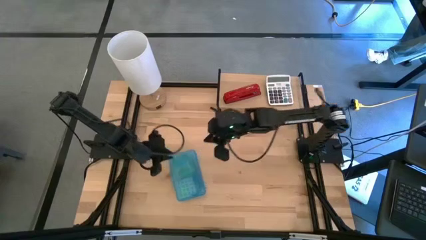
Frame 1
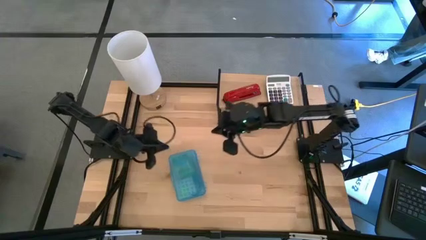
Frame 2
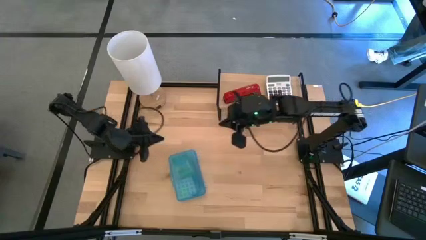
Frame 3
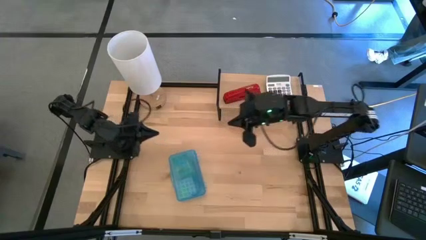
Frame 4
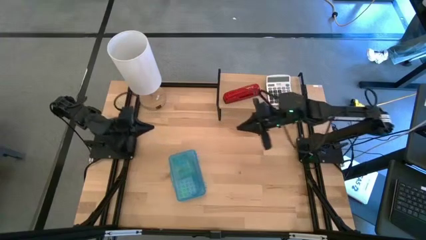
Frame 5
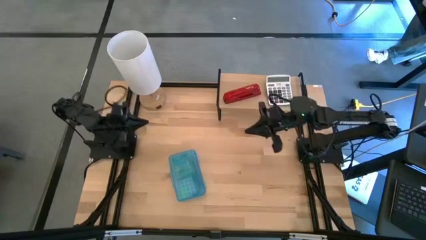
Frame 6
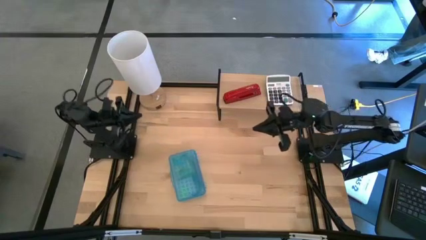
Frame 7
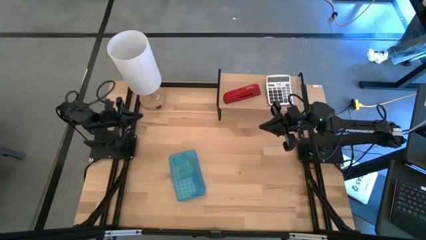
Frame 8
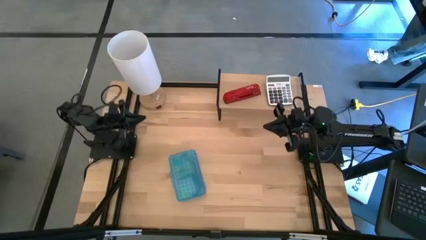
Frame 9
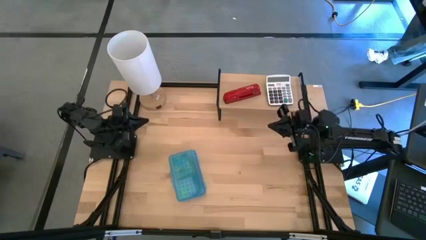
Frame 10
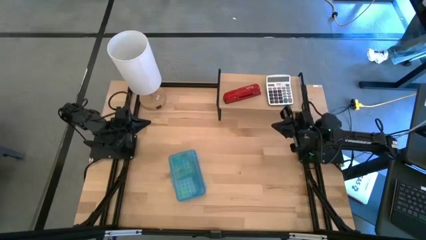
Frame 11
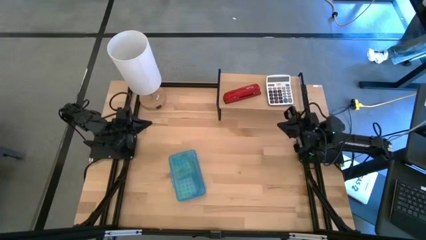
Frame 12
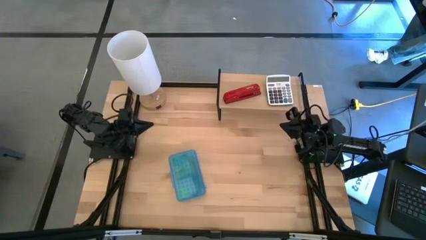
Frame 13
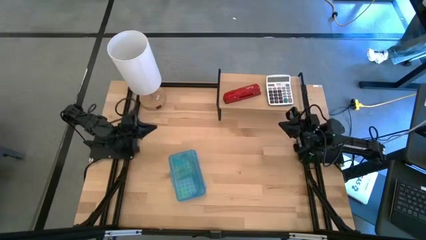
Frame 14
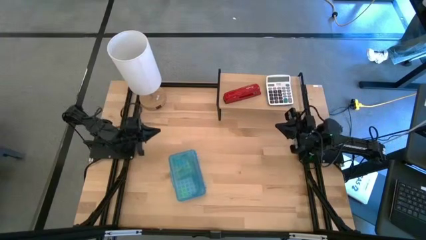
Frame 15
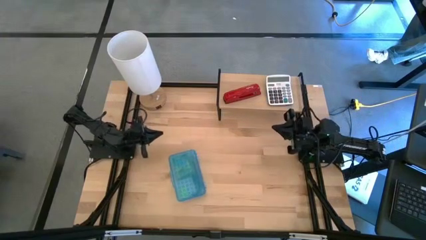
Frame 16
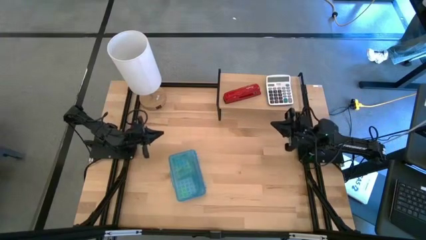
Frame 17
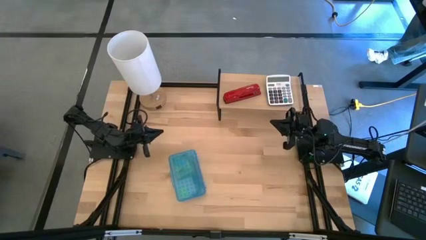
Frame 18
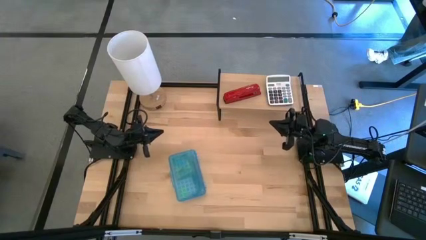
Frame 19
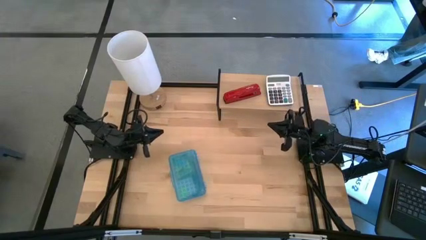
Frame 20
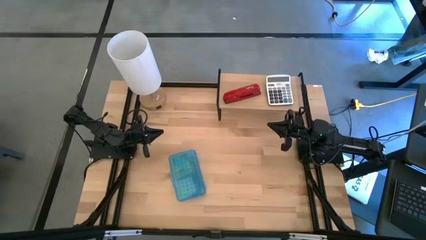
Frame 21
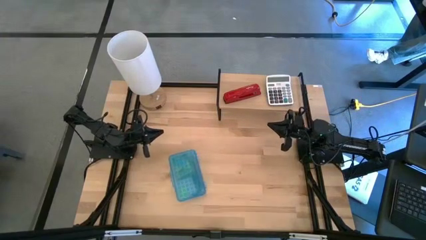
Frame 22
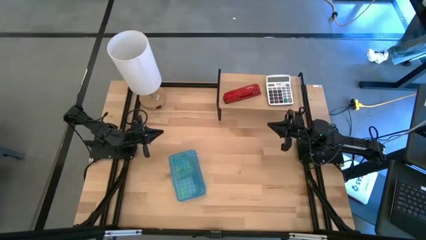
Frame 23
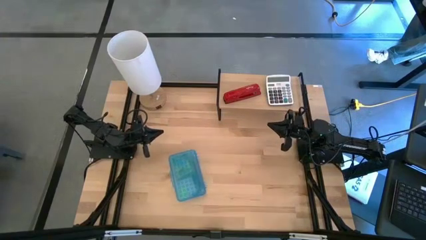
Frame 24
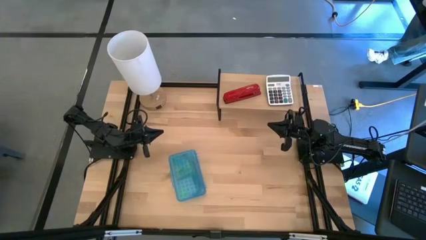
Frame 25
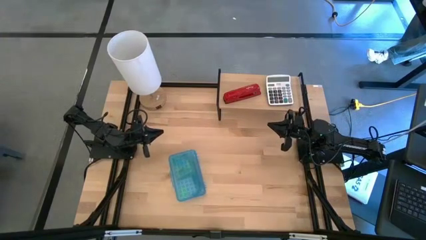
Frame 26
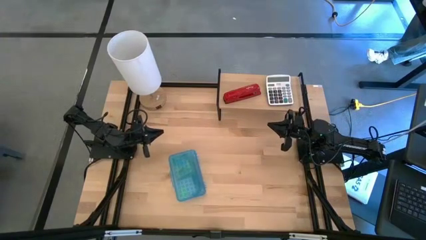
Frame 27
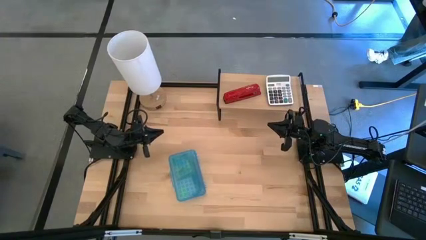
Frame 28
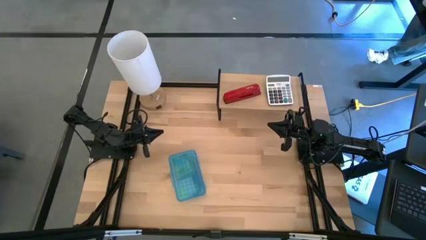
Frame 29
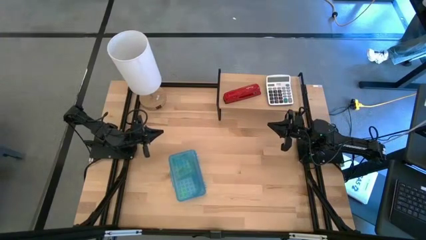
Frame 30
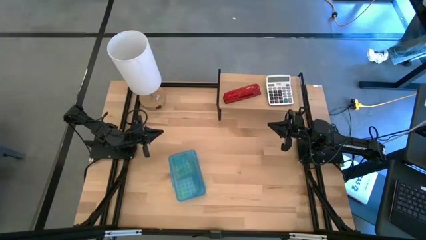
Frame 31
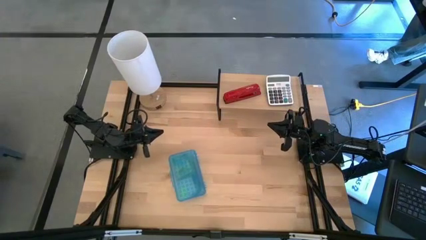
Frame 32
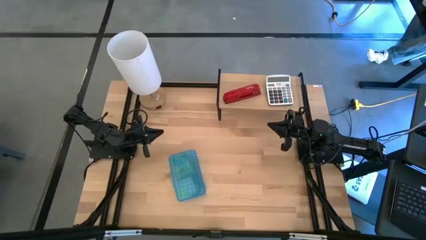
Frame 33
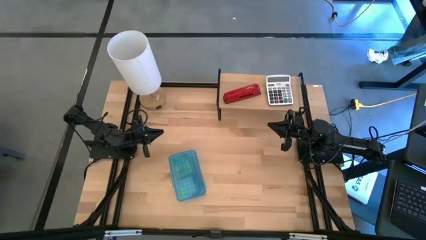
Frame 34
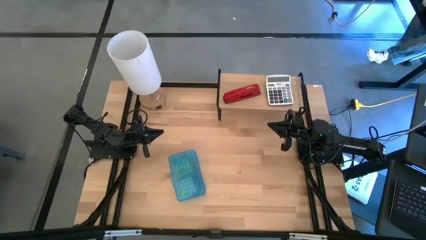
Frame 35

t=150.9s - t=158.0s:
Task: Pack school essentials
Return to Home Position

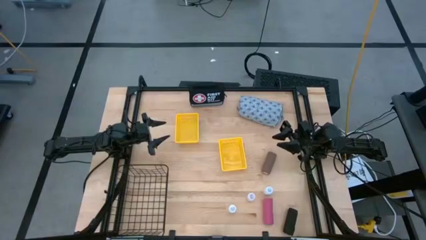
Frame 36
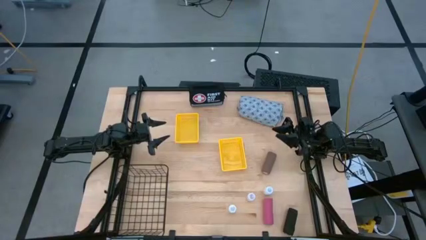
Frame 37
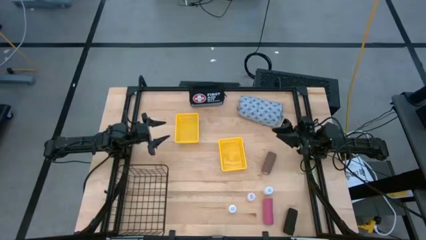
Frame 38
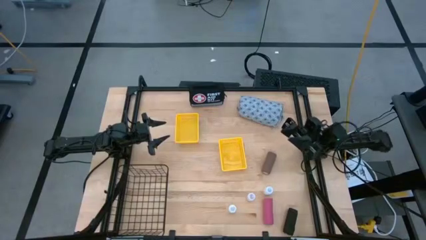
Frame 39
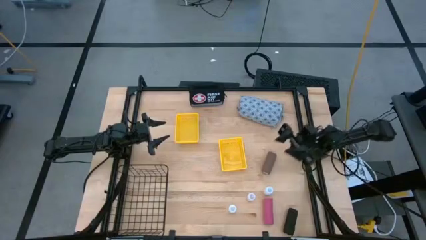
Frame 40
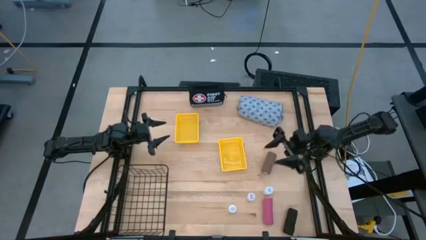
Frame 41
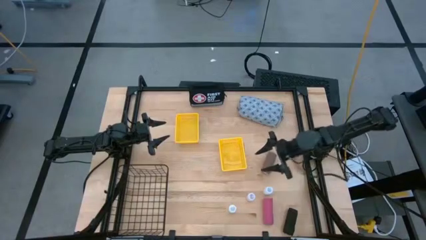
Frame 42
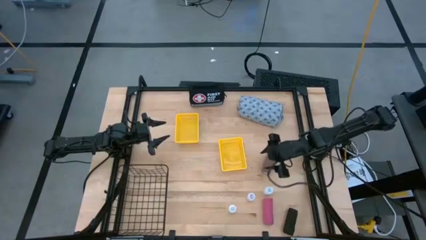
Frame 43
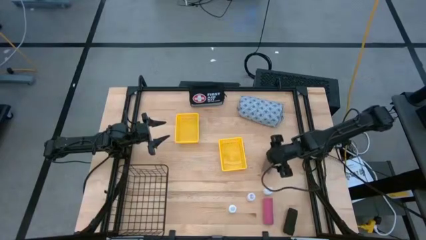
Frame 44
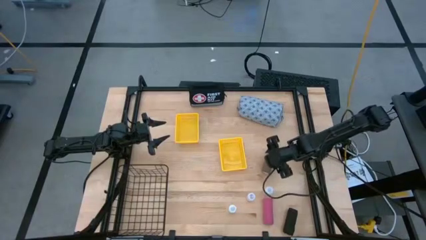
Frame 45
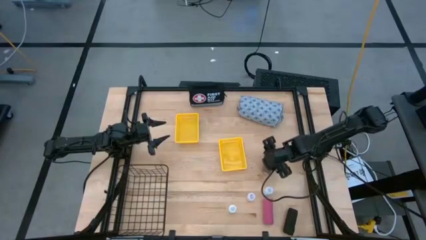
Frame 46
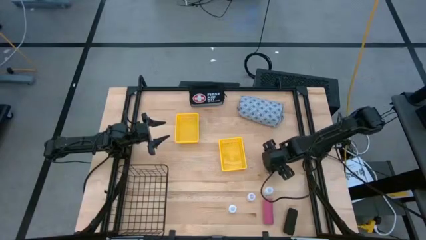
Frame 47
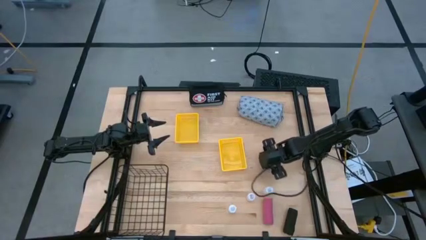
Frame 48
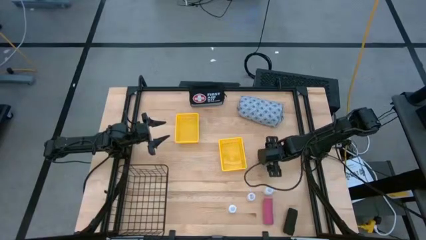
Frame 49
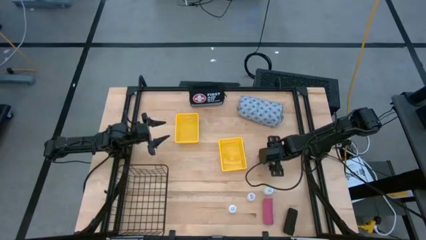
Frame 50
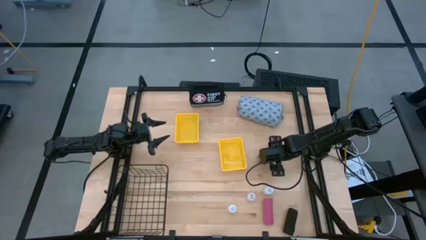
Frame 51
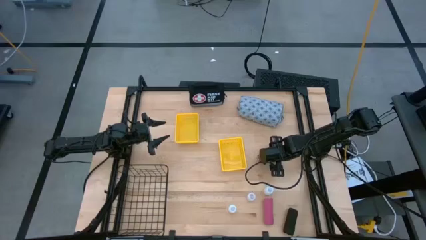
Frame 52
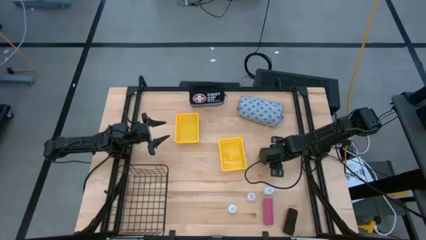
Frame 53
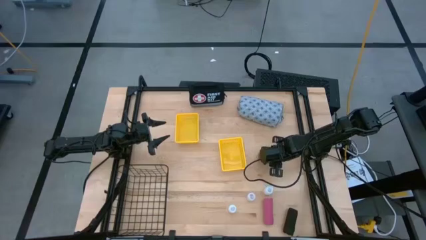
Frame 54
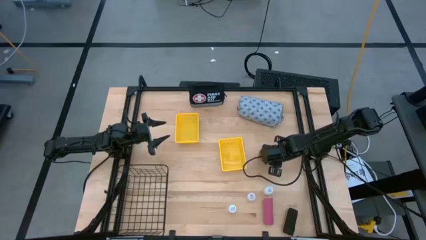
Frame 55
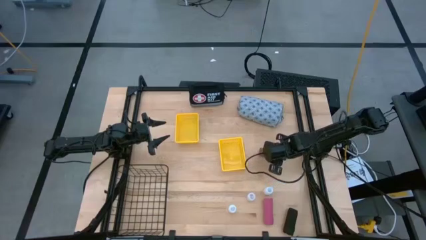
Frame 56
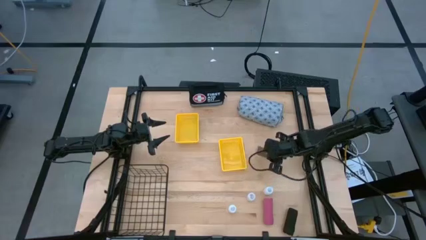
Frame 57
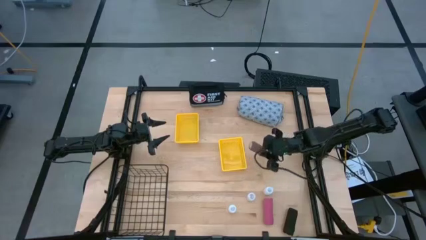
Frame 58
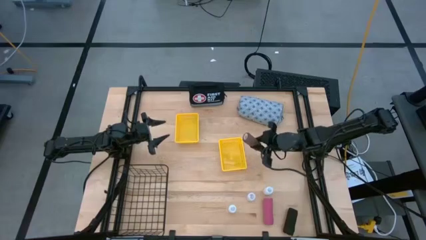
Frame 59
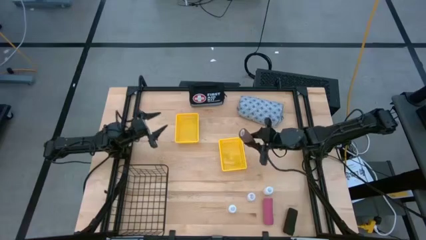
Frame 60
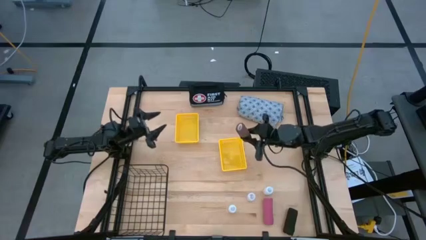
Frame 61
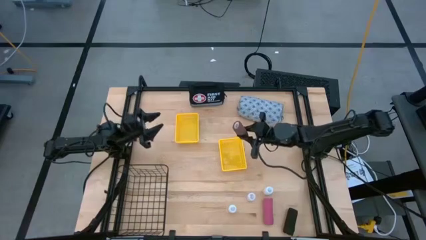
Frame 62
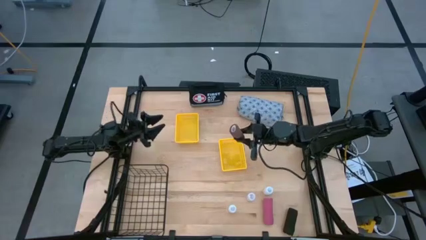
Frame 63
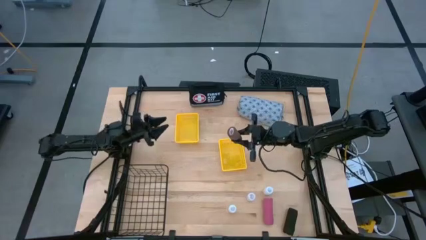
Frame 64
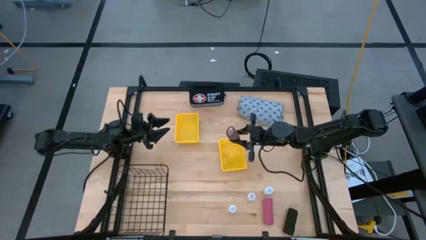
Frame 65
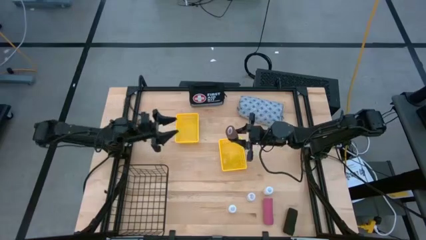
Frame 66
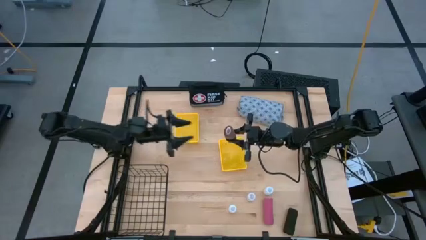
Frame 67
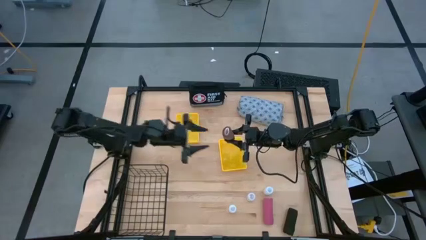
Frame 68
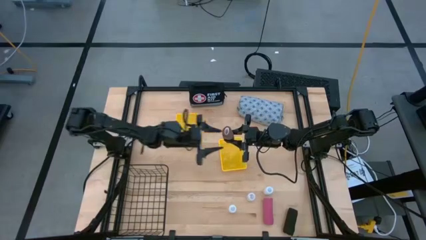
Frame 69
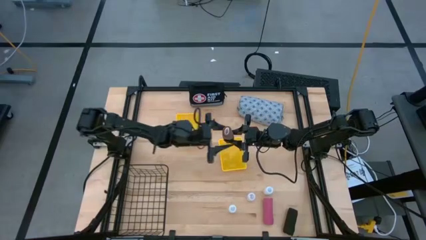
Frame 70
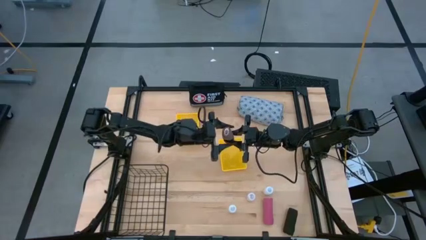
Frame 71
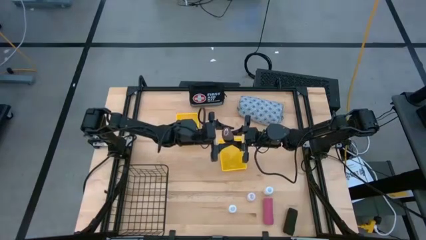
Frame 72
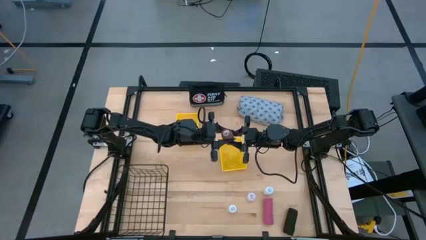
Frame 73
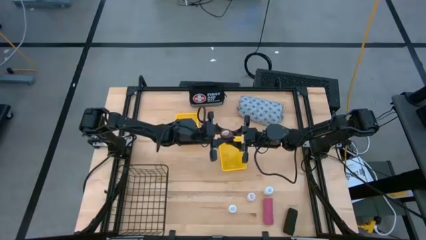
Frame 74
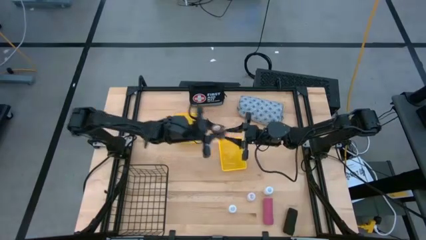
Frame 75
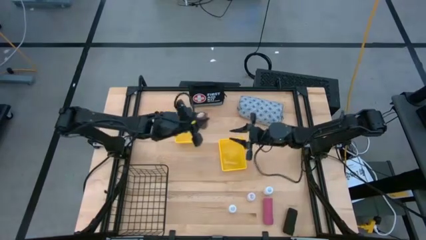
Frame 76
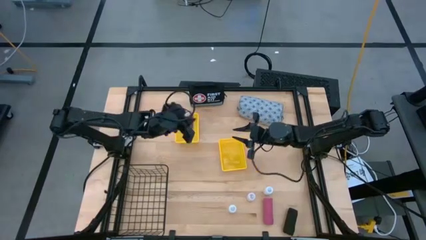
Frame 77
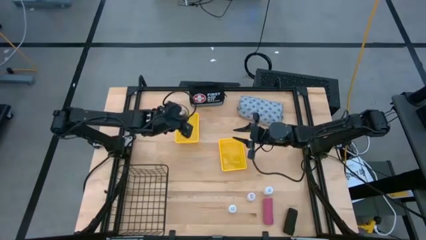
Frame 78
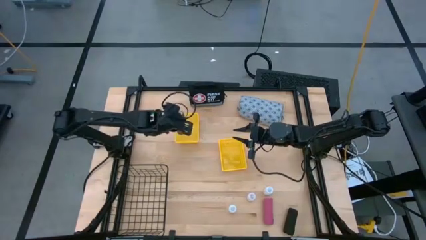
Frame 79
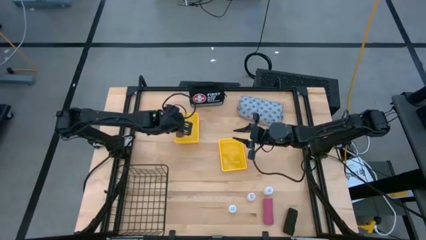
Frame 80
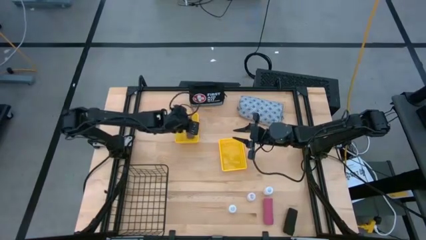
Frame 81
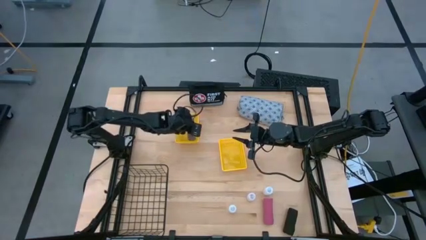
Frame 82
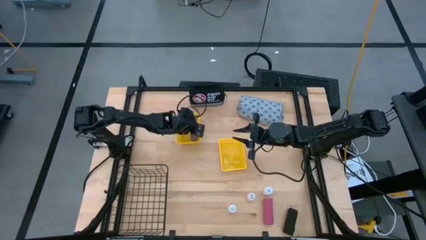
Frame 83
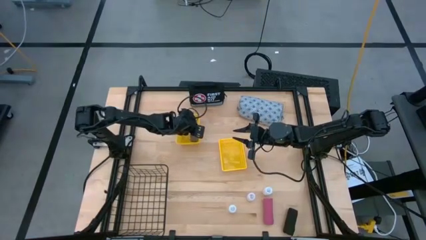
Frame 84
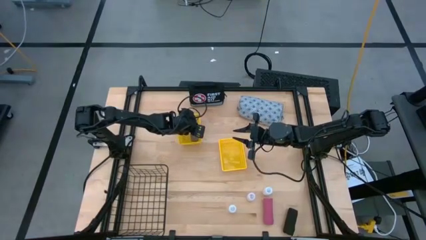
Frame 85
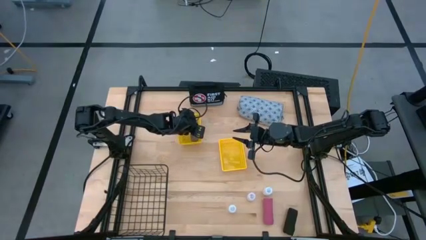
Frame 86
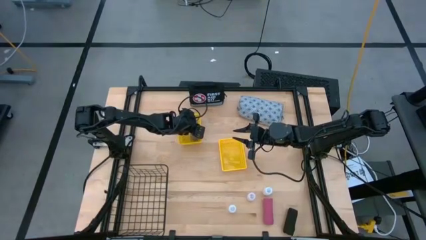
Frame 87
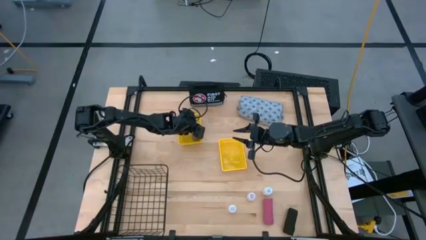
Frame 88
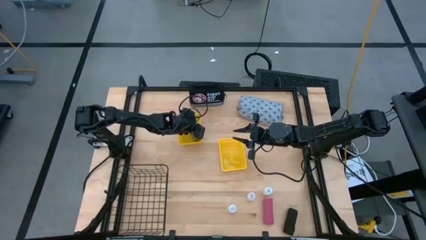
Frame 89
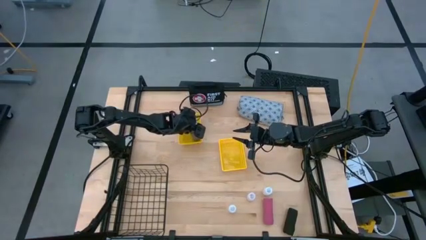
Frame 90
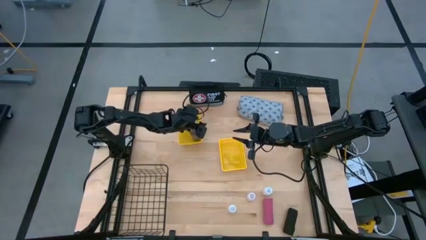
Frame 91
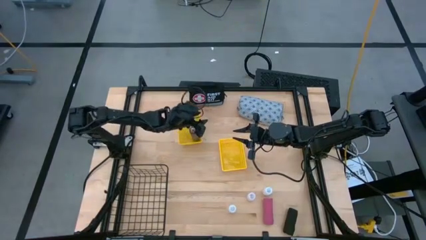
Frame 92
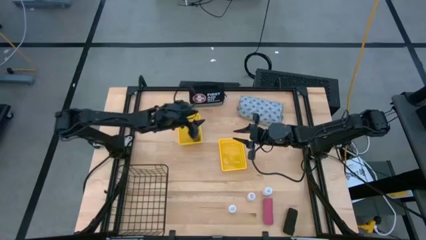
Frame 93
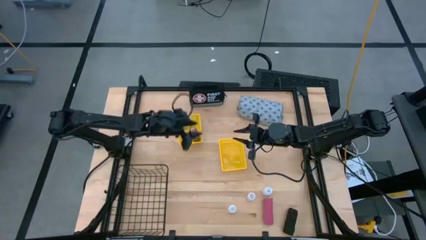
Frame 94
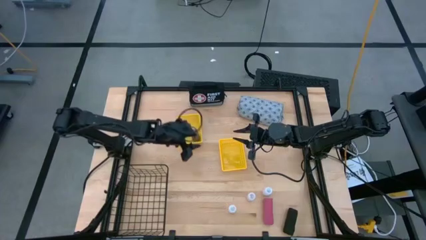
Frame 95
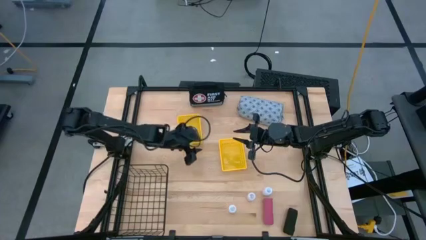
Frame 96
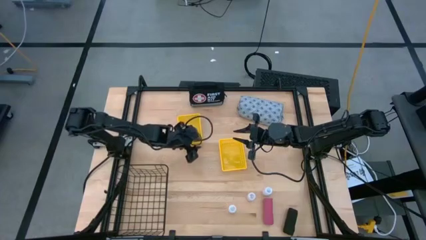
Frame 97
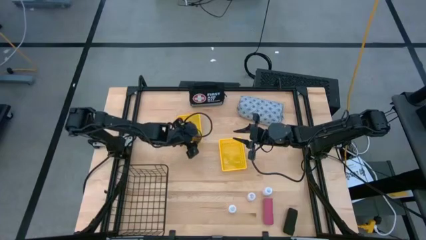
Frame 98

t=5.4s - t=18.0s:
Task: Pick & Place Medicine items
Put the brown bandage into the left yellow basket
